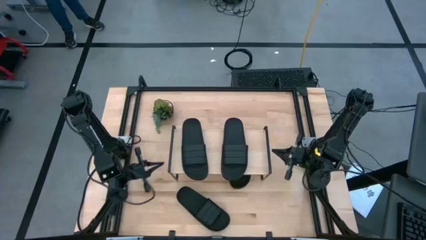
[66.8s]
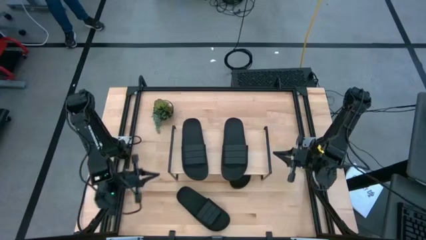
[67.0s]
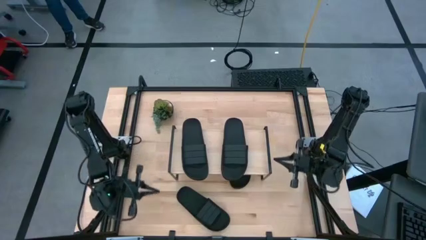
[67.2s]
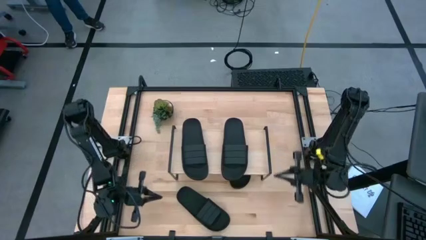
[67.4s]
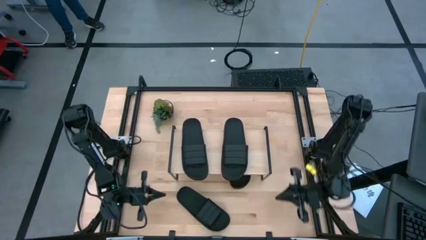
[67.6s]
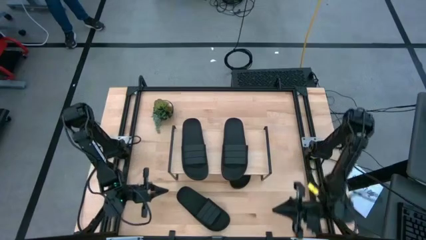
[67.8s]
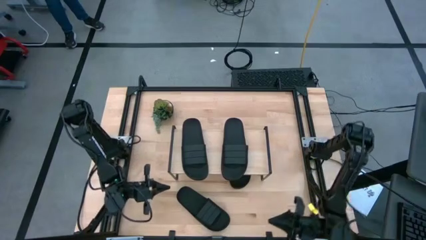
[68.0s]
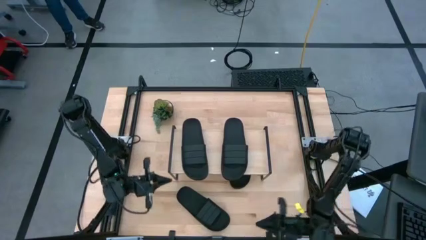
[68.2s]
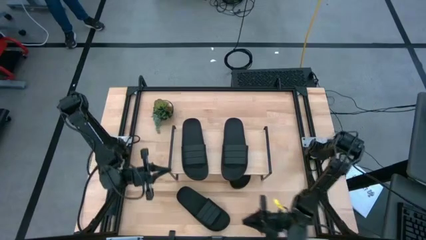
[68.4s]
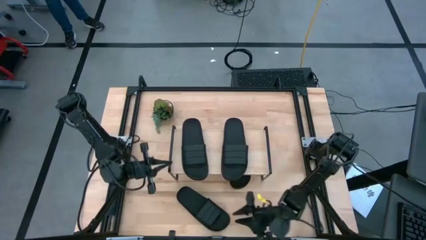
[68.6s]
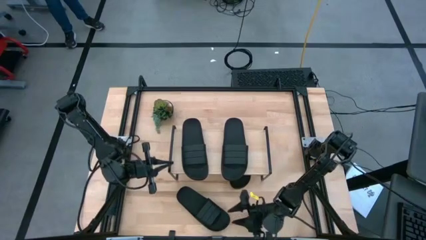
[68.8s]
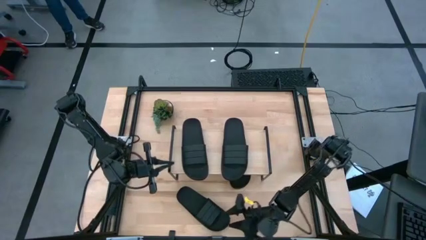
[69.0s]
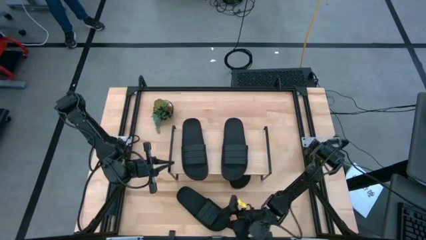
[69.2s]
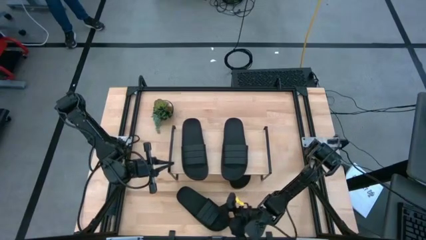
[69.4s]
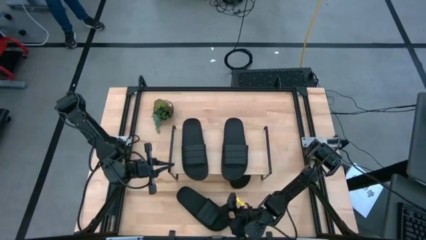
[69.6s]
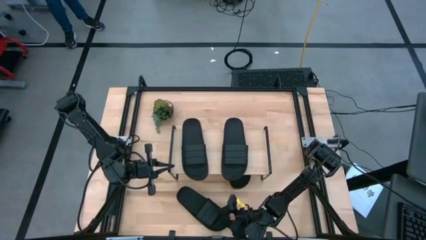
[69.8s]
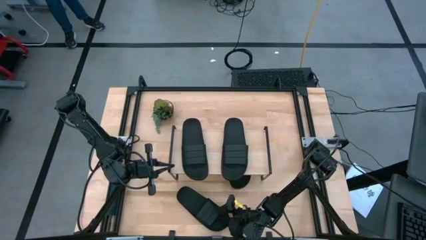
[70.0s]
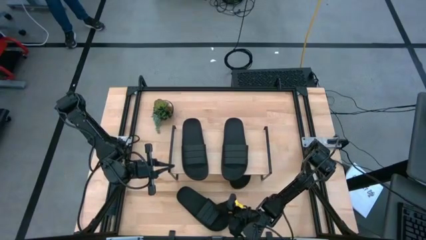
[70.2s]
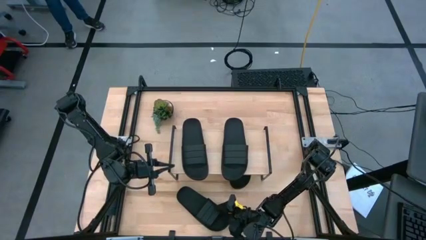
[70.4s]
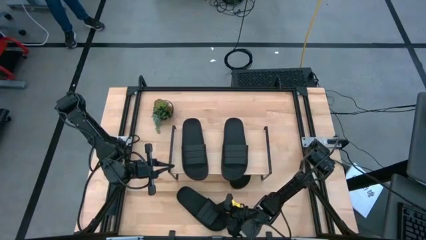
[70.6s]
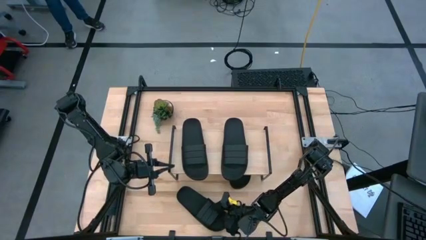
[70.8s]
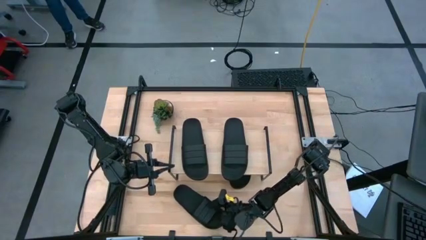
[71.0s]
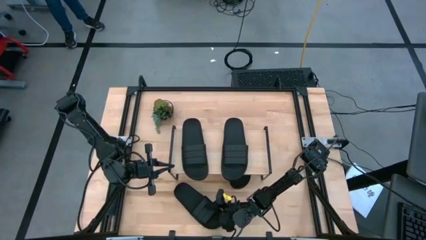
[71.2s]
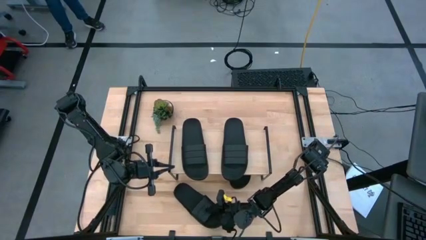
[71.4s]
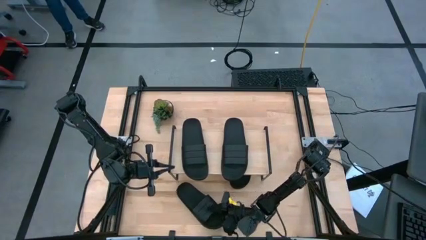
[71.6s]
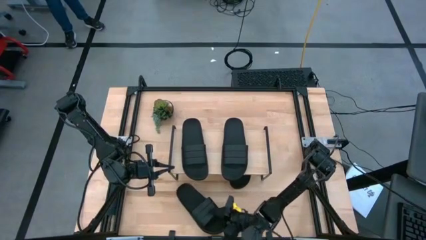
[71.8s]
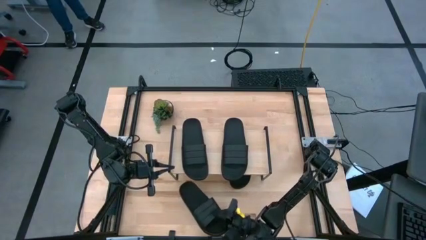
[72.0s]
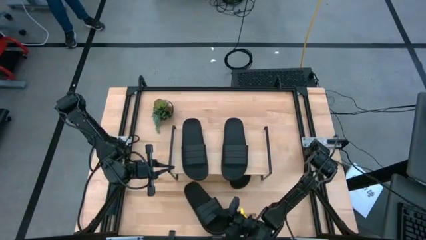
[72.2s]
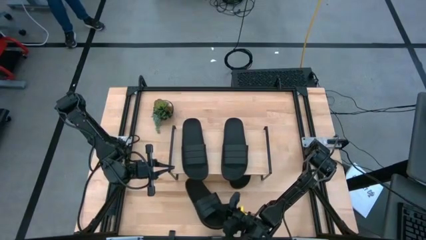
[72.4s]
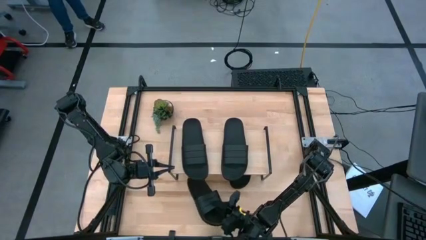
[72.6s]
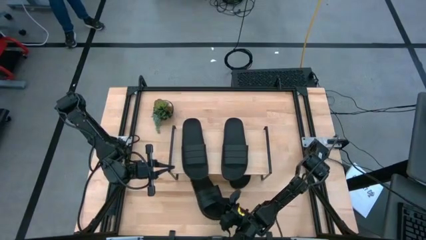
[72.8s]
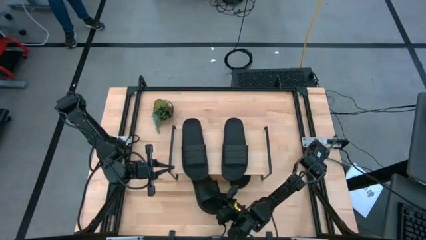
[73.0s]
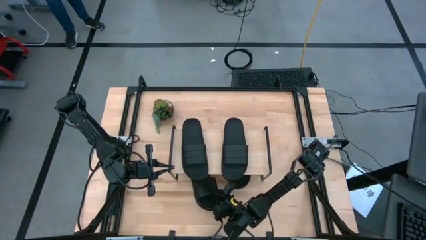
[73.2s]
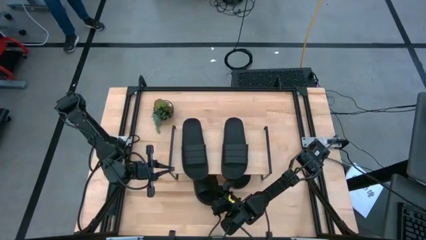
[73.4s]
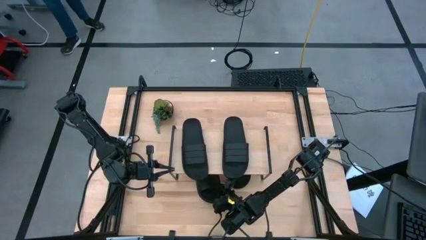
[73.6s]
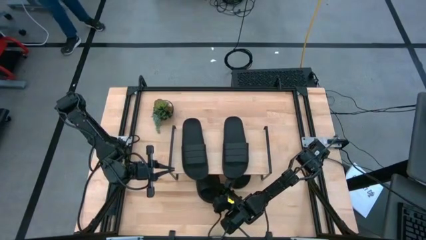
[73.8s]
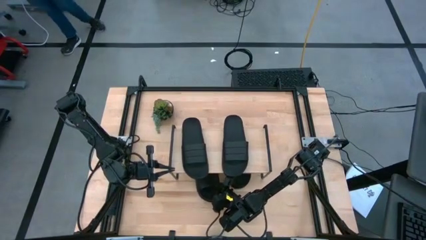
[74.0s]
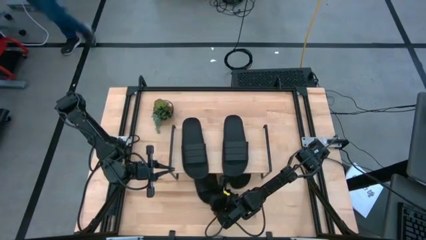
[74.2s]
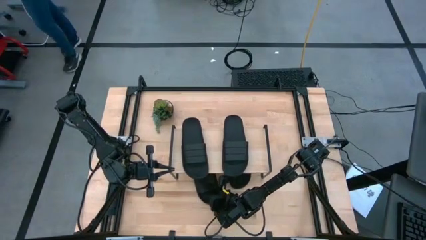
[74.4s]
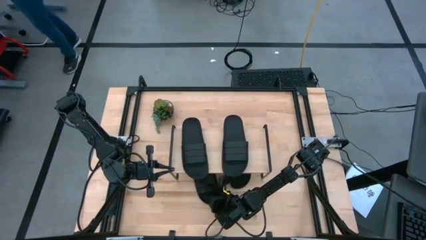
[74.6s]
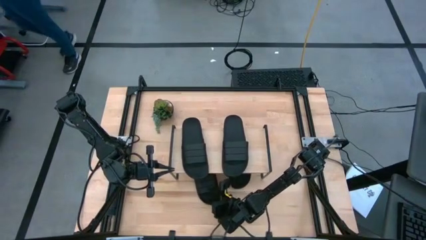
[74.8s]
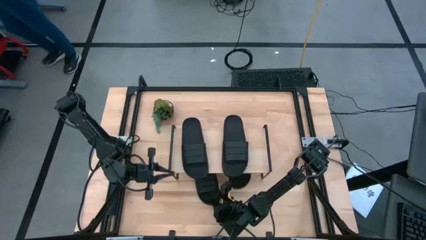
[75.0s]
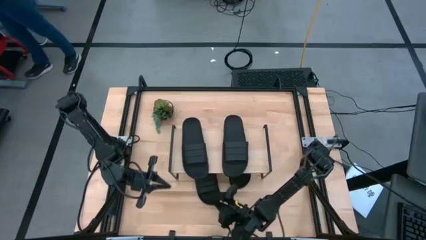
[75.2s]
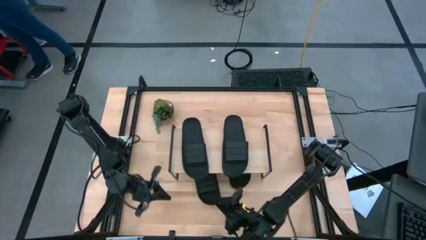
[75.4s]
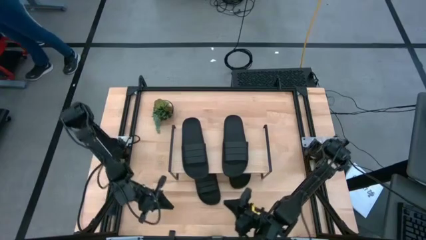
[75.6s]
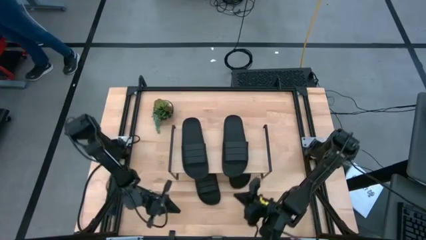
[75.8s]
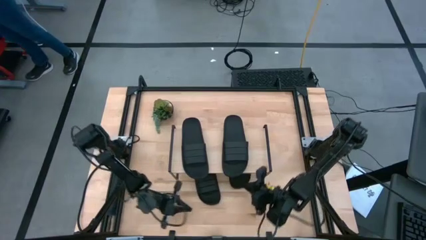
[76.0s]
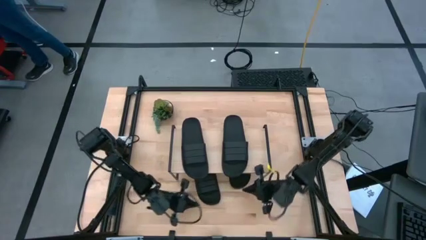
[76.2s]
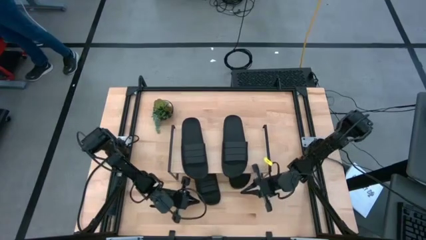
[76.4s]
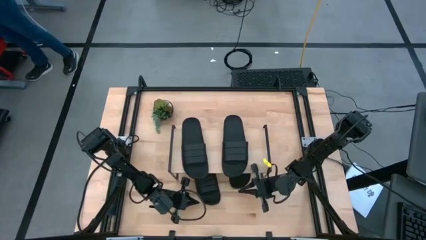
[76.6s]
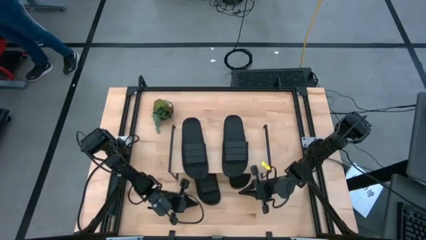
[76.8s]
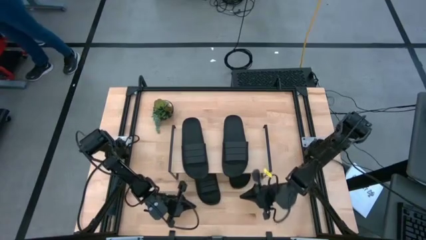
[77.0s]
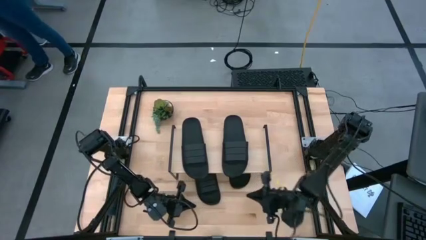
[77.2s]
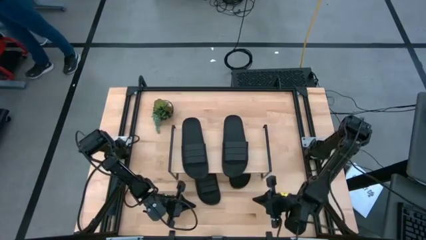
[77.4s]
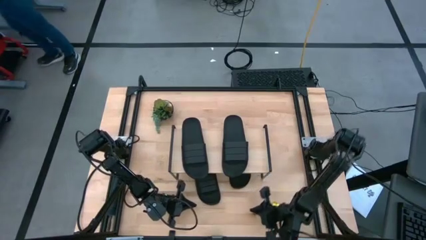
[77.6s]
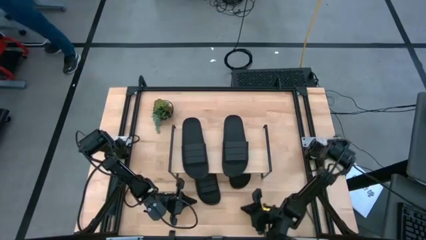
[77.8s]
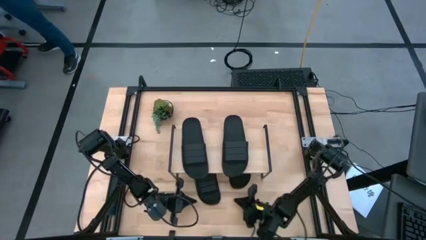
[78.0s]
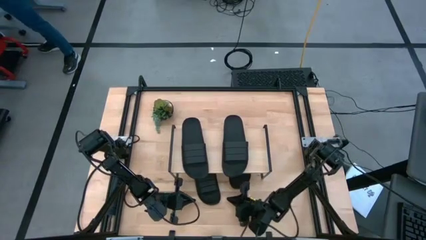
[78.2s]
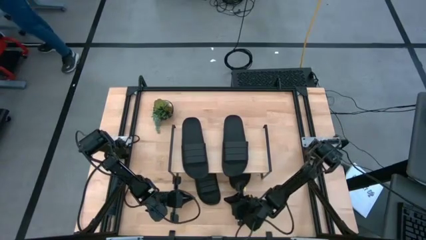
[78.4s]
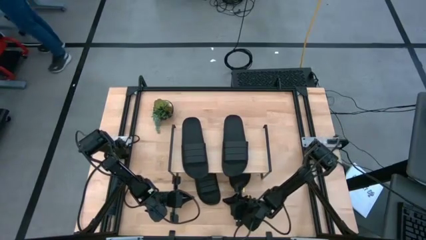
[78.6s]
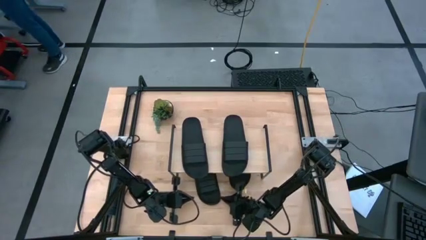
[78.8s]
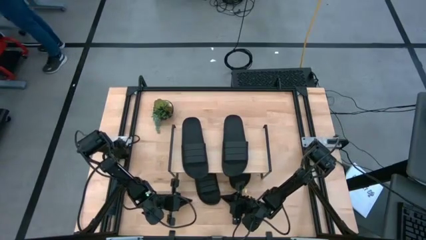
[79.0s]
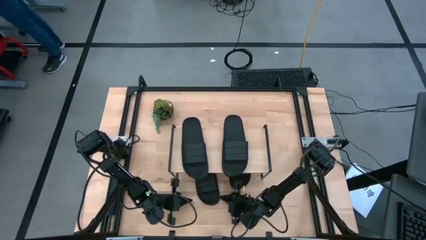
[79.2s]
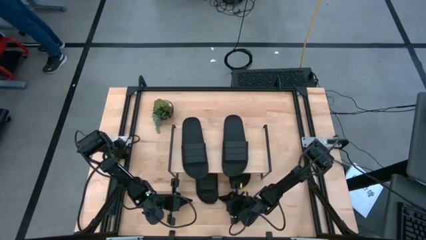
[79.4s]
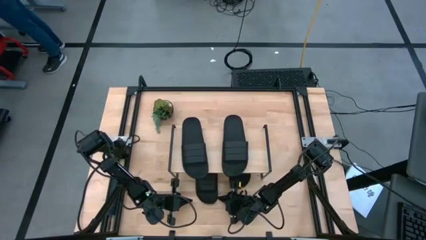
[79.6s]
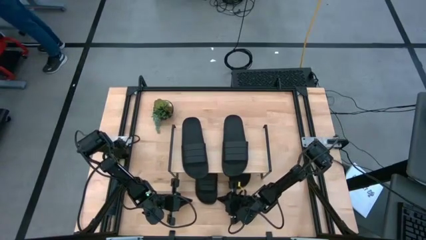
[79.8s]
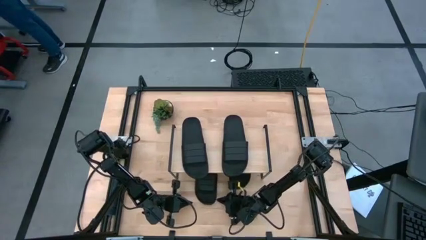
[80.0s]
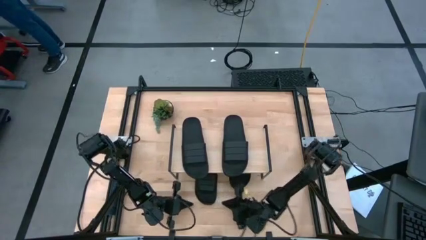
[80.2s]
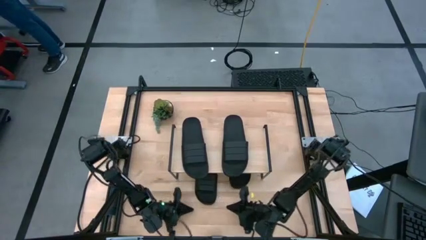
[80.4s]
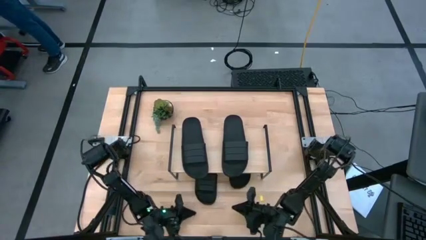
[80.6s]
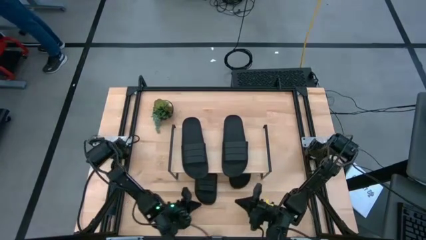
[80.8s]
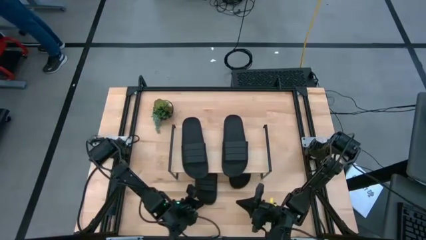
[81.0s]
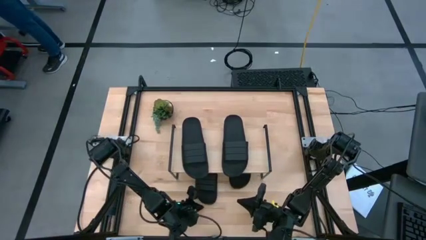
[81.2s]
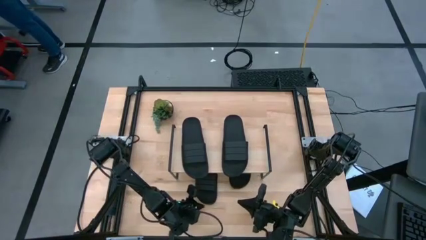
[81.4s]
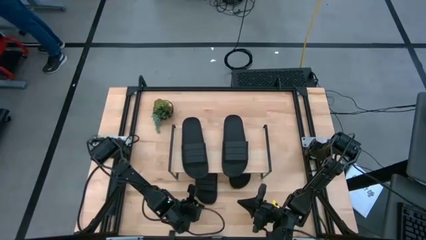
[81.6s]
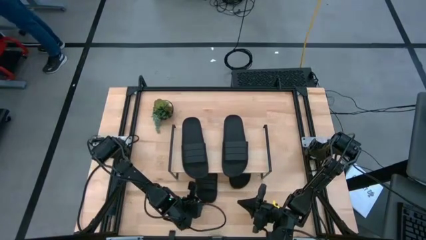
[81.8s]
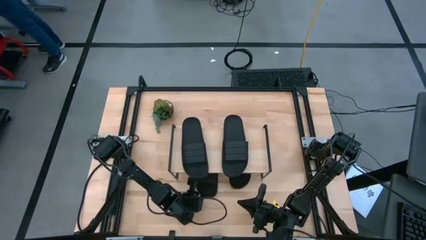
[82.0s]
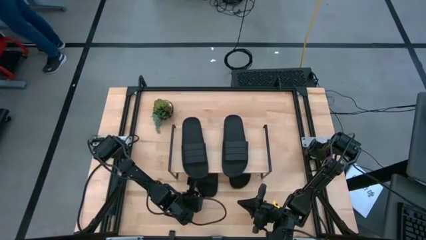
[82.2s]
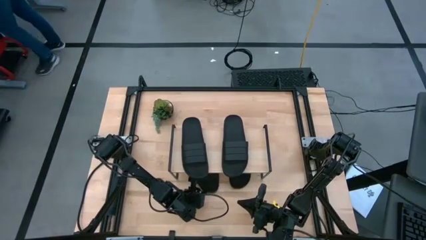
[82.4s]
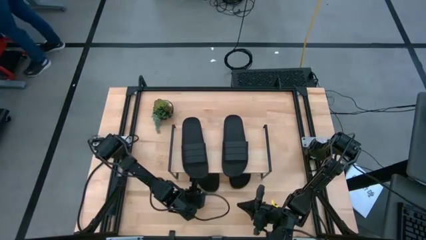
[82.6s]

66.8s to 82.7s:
Task: Pick and place slides into the shelf
Put the black slipper under the shelf

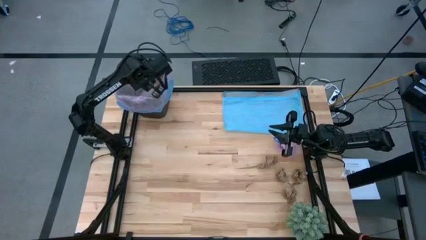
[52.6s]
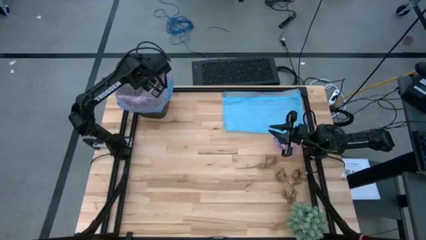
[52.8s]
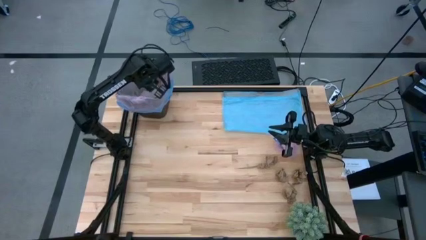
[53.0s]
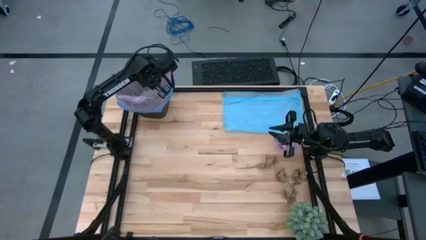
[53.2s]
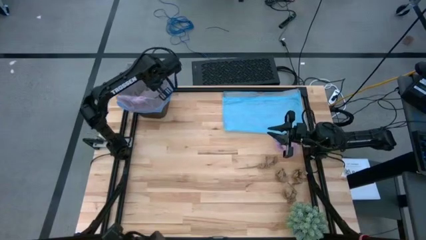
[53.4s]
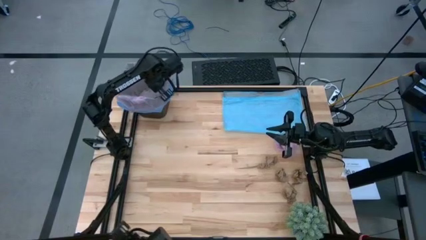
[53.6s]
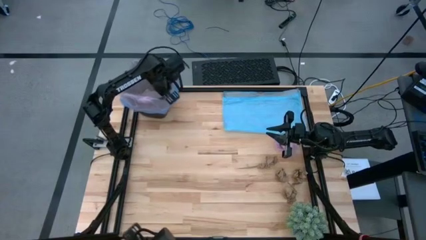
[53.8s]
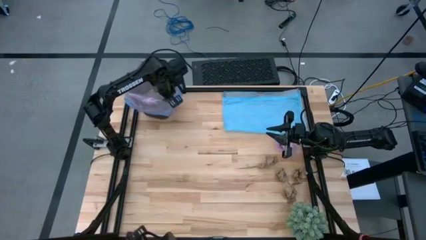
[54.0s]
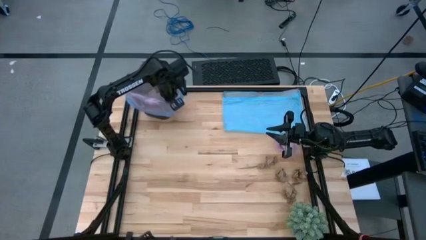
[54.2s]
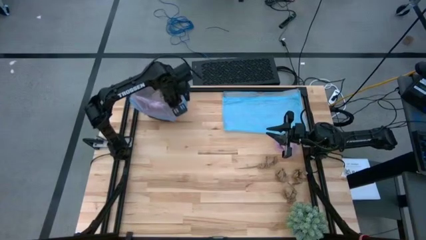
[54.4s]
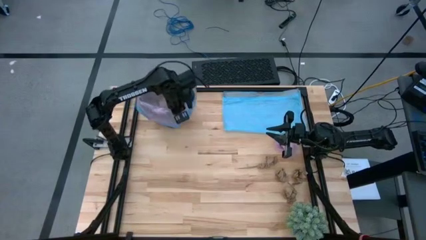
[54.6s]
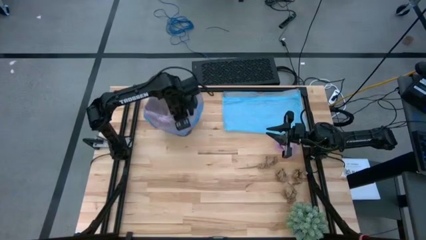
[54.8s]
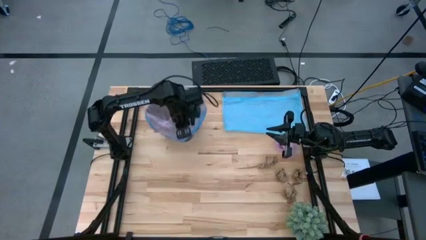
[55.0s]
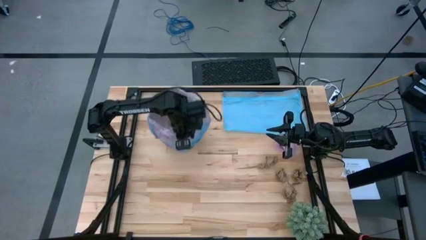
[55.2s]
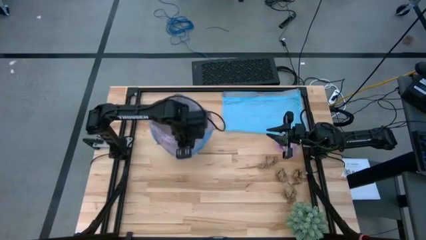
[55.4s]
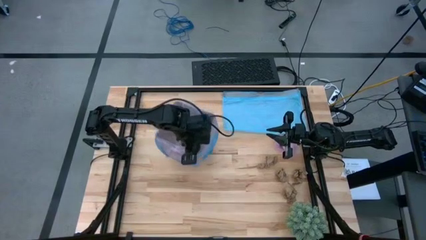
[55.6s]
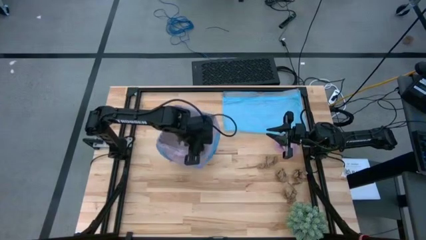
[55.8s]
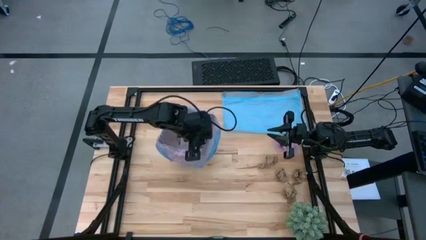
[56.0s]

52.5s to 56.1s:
Task: place trash/remove bag and relplace
Move the trash bin to the center of the table
